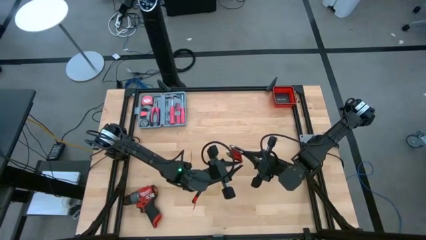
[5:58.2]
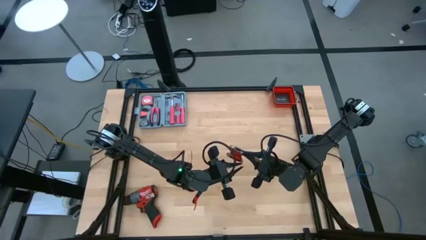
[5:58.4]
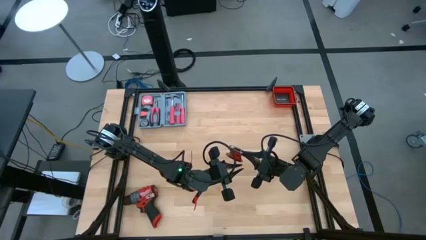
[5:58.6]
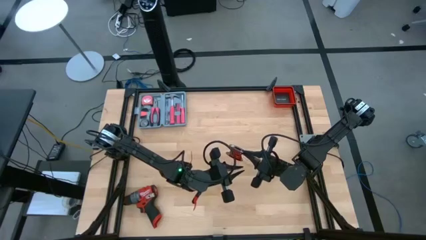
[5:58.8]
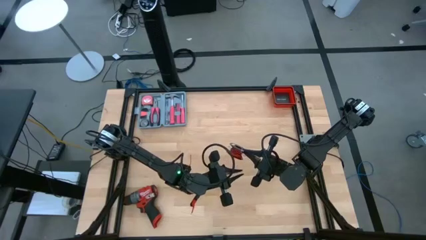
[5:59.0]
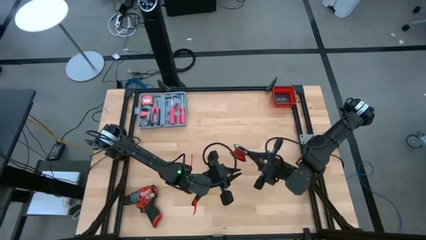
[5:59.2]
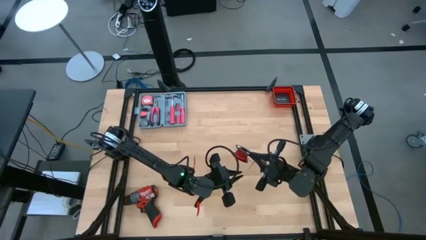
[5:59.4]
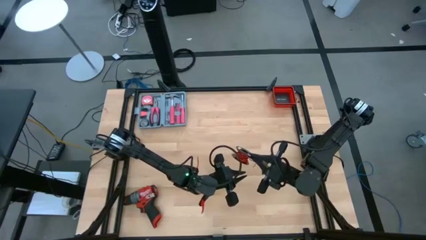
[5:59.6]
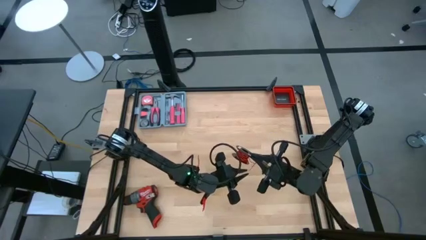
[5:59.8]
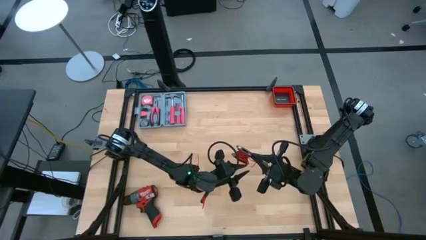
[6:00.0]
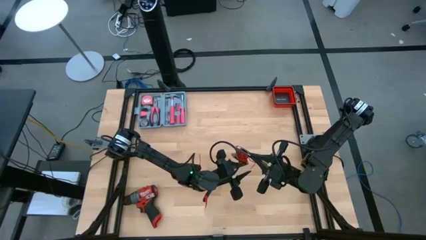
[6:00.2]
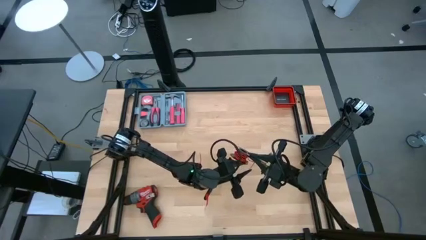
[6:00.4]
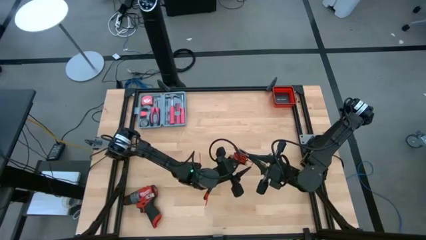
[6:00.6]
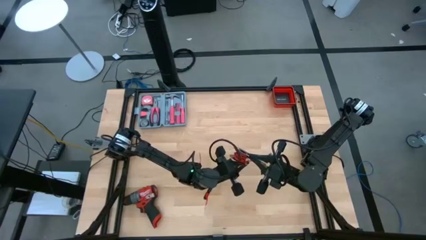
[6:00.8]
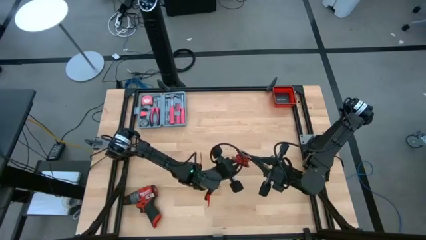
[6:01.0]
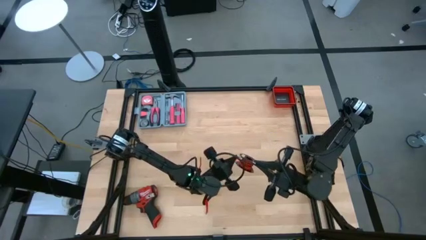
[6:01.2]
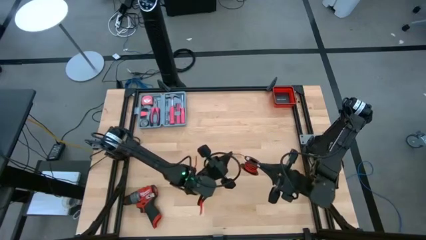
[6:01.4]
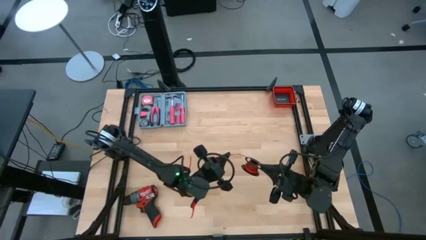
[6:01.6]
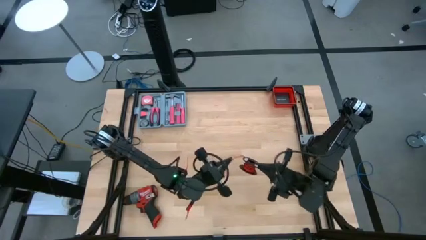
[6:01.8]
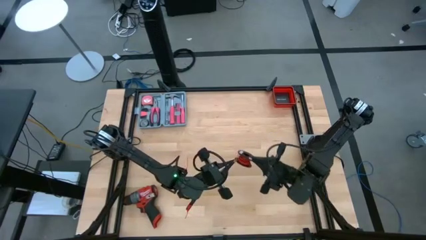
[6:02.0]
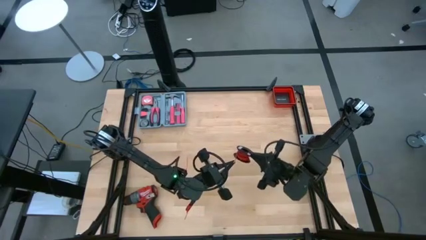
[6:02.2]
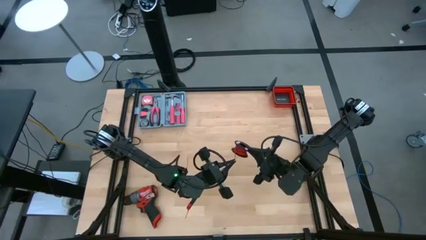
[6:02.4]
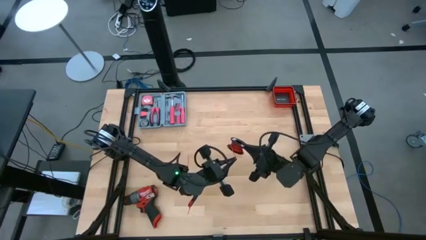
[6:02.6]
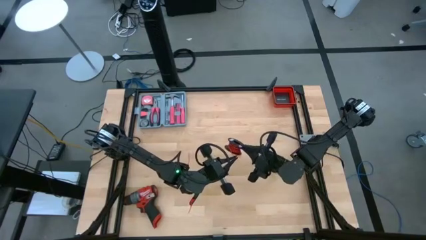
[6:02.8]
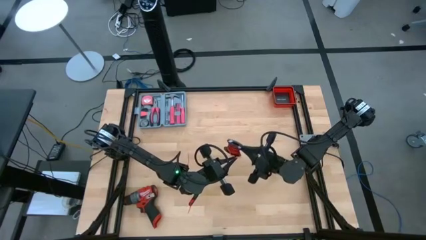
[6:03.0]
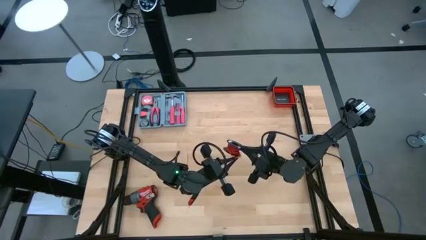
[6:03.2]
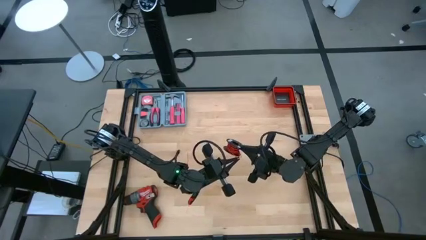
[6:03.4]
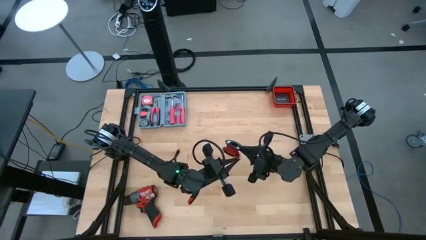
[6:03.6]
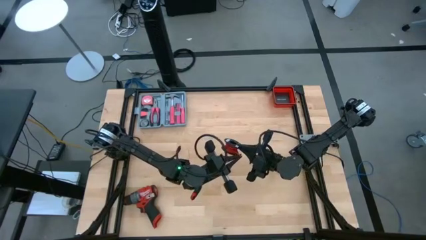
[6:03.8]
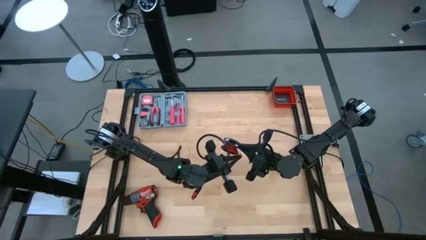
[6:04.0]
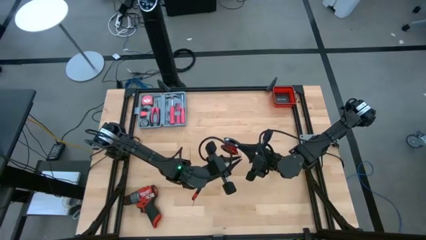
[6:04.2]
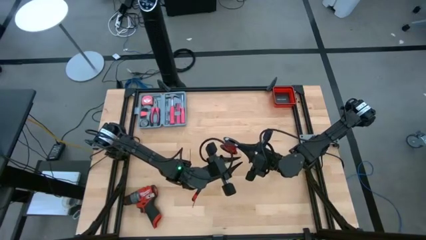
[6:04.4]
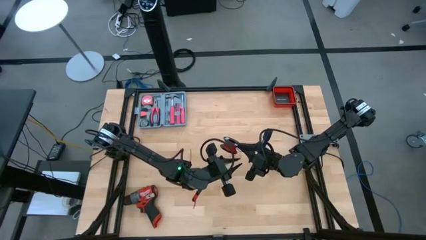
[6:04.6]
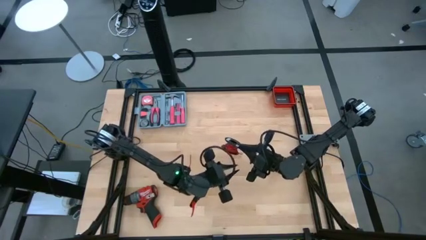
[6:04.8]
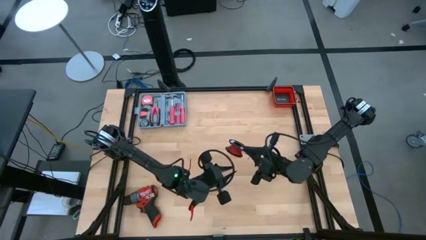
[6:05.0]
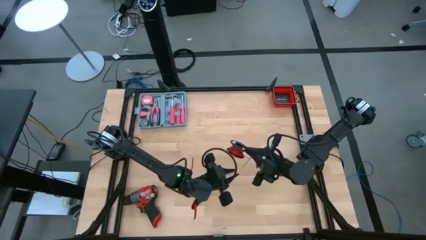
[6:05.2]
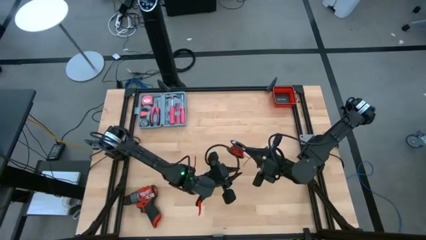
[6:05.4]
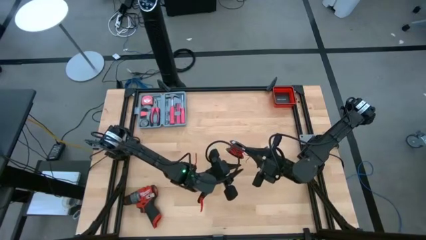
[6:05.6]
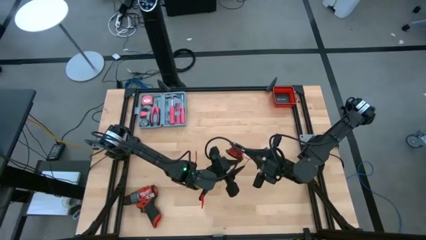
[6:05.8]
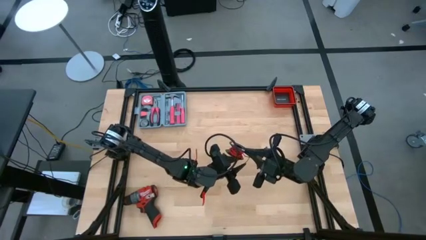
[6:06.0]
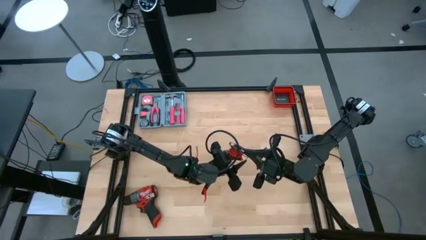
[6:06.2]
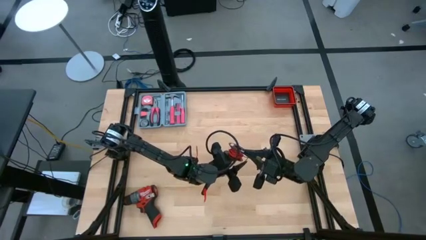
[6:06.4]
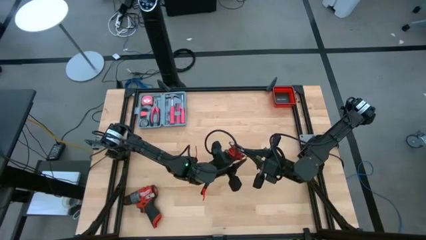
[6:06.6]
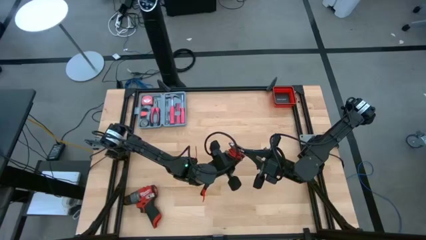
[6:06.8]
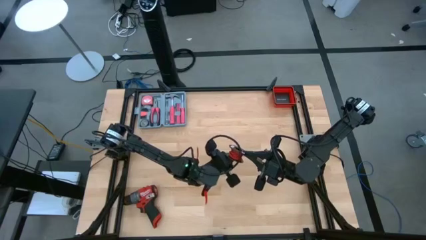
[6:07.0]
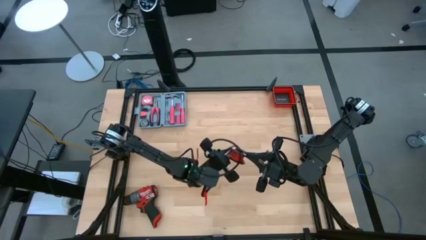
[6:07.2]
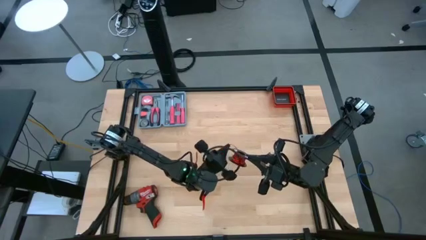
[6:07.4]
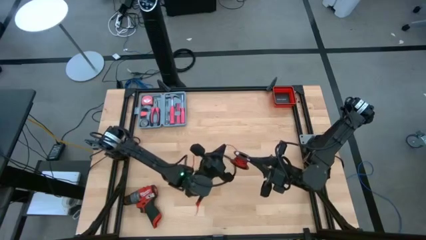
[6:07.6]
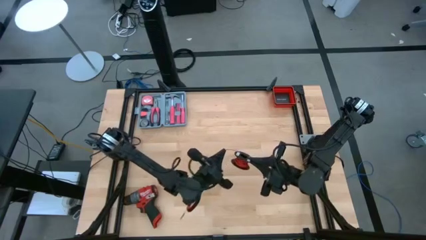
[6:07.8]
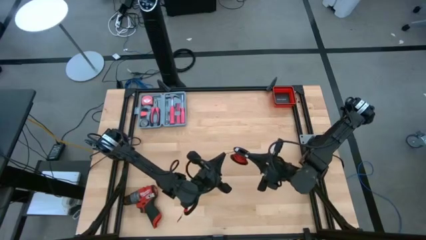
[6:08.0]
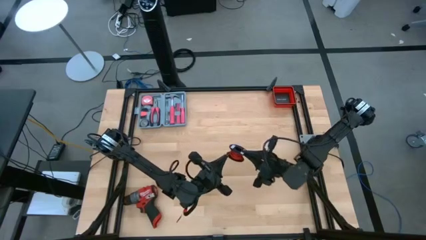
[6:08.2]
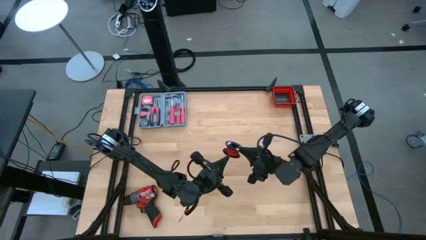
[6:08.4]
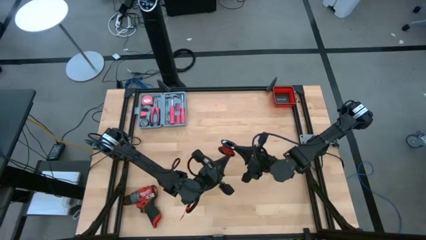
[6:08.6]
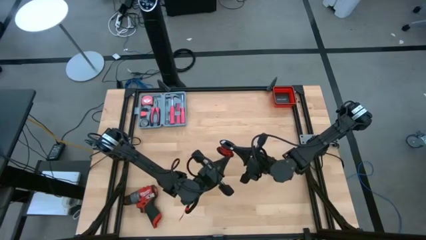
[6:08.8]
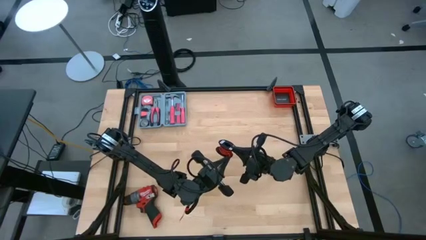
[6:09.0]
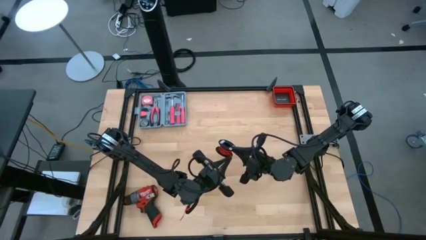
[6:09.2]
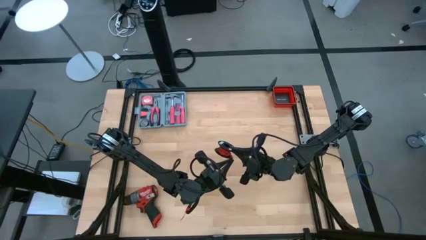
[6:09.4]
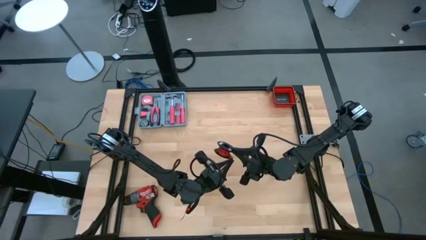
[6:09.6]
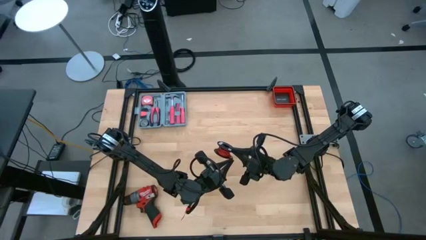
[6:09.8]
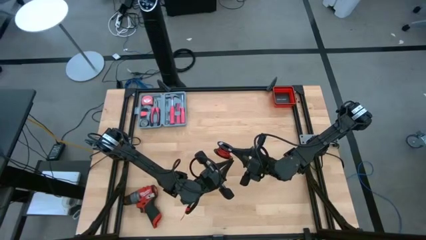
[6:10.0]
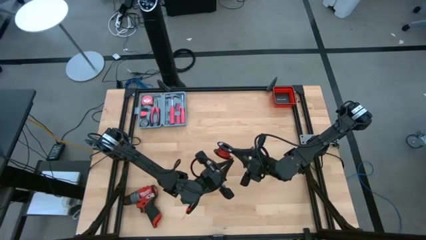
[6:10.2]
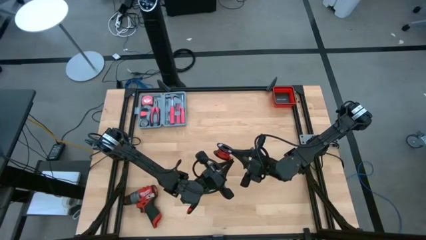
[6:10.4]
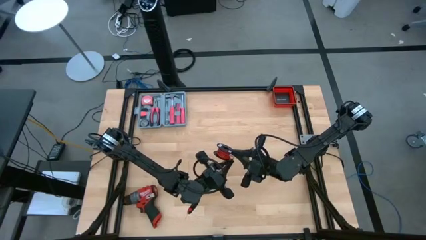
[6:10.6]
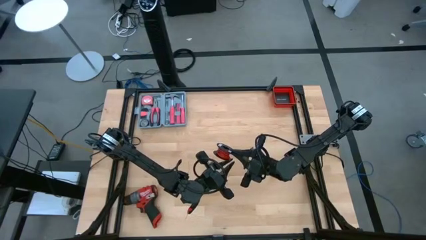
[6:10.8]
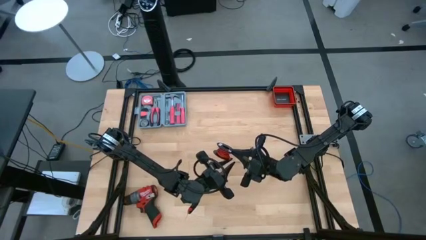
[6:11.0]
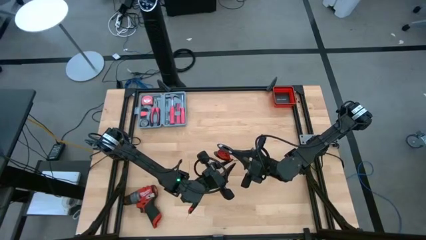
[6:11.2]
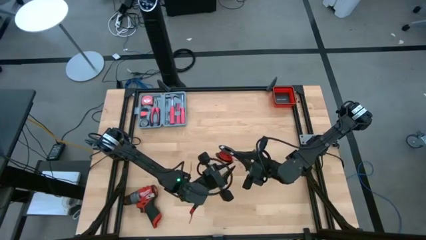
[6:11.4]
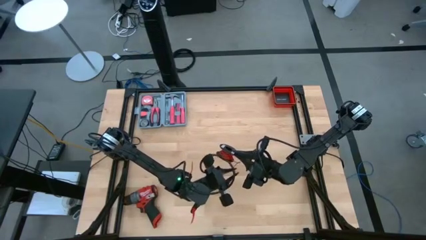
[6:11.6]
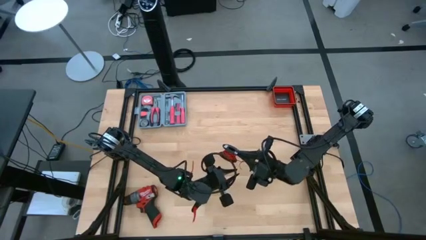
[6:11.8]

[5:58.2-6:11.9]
Task: Coil cords
Coil the red wire on the black spool
